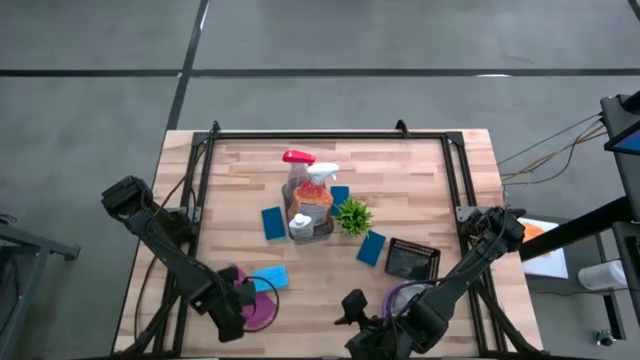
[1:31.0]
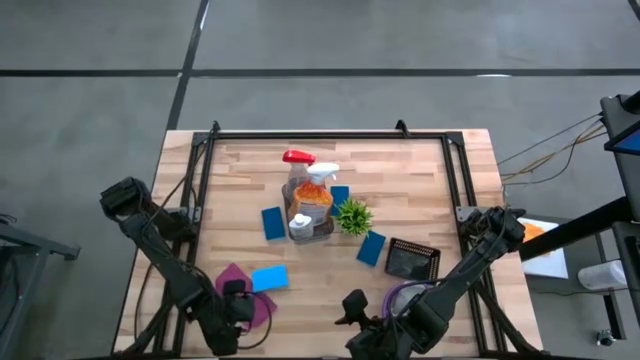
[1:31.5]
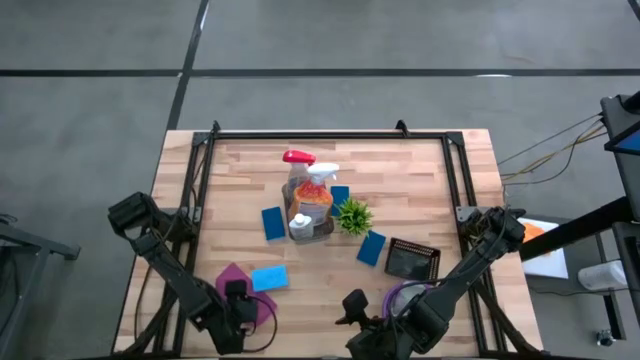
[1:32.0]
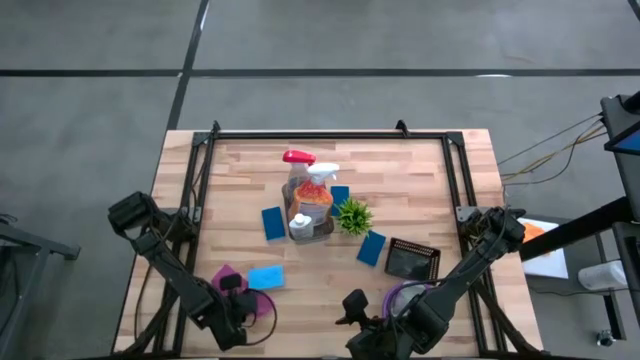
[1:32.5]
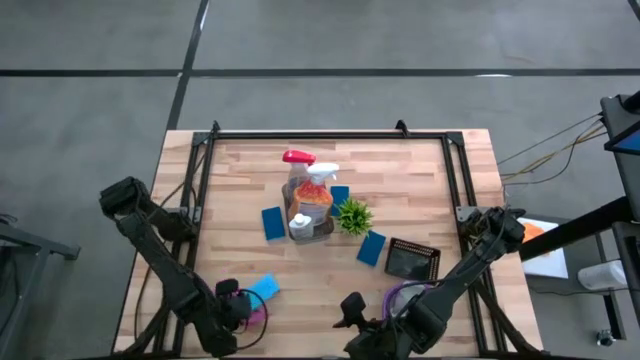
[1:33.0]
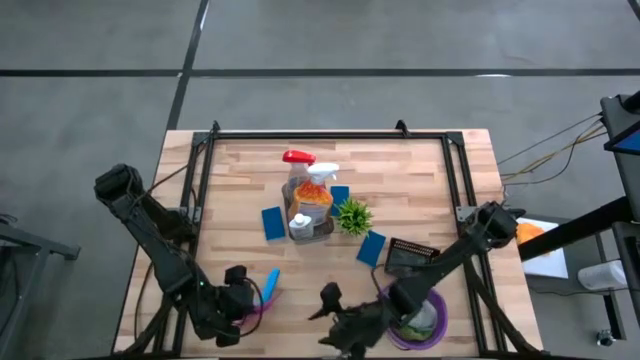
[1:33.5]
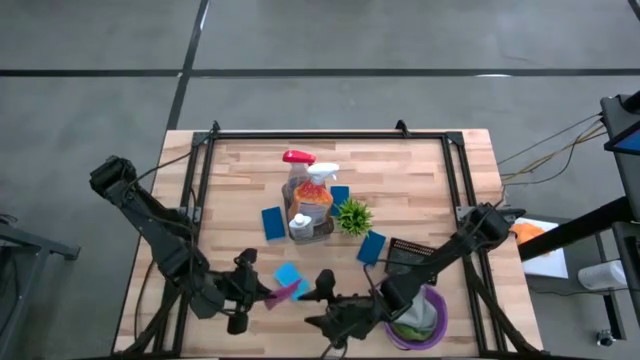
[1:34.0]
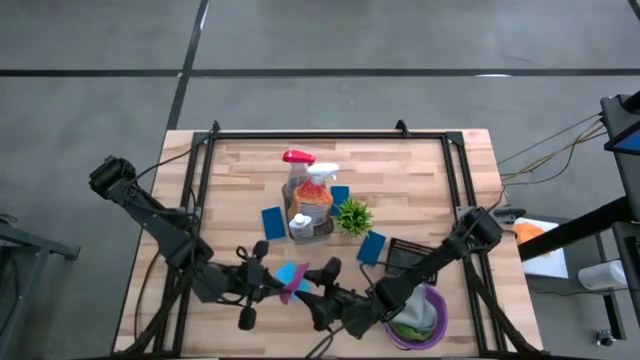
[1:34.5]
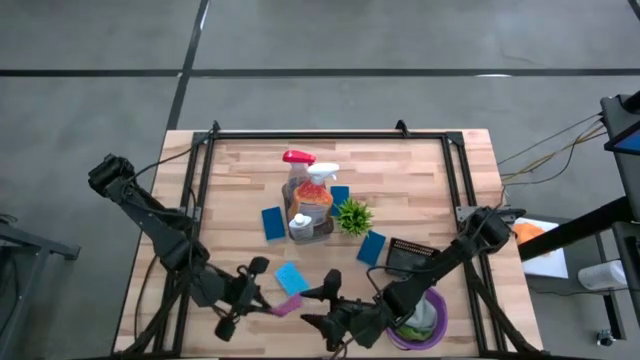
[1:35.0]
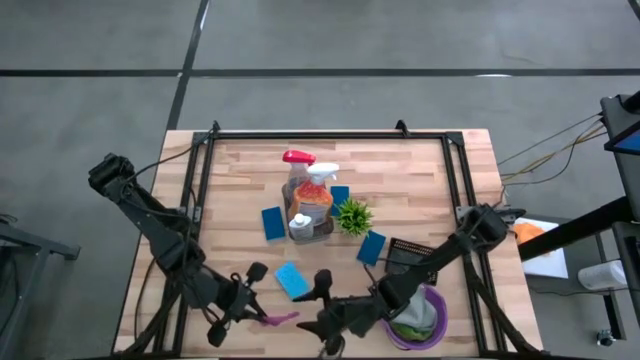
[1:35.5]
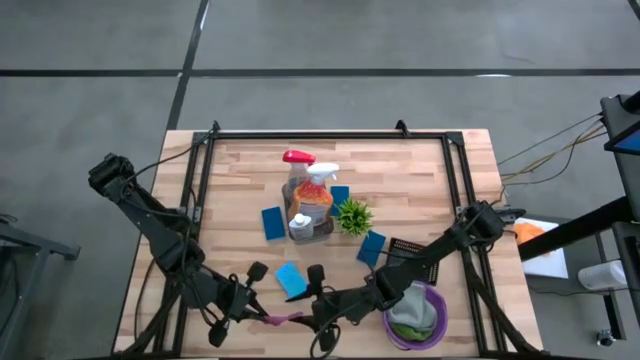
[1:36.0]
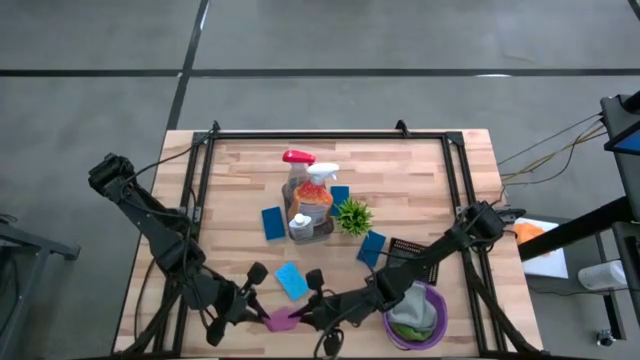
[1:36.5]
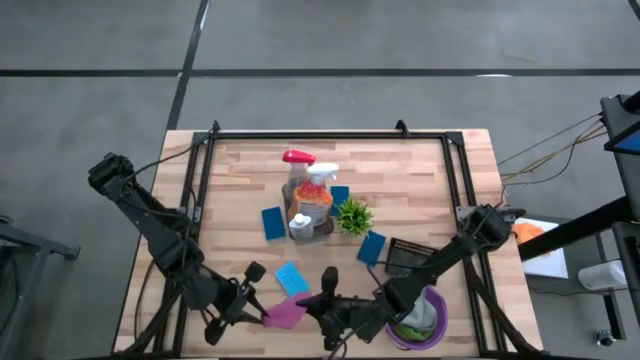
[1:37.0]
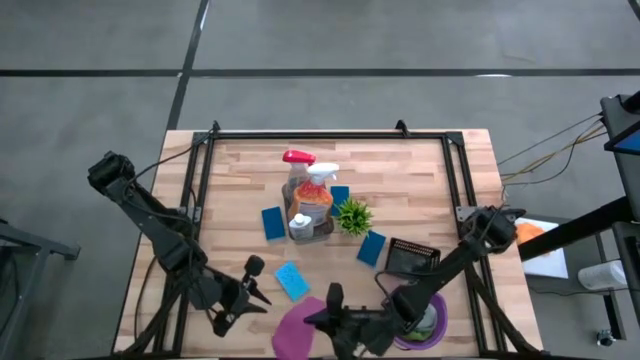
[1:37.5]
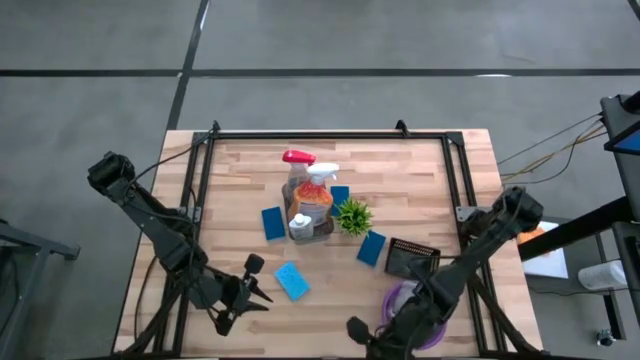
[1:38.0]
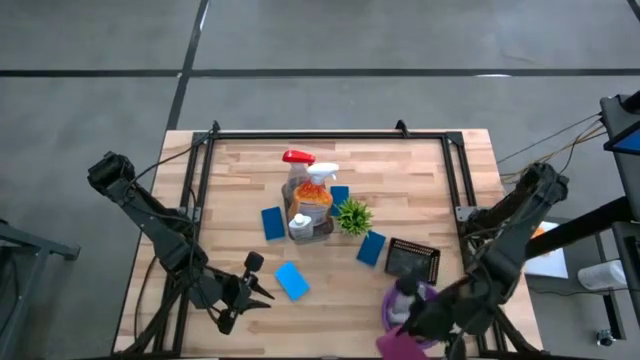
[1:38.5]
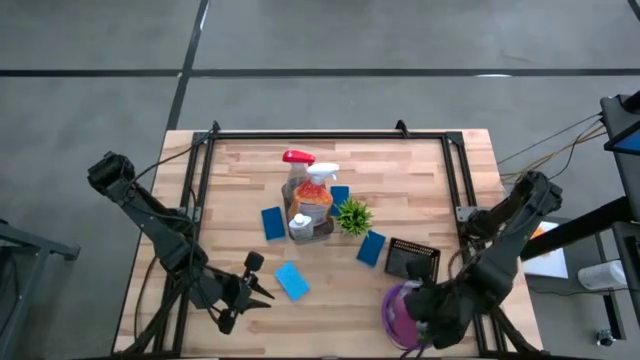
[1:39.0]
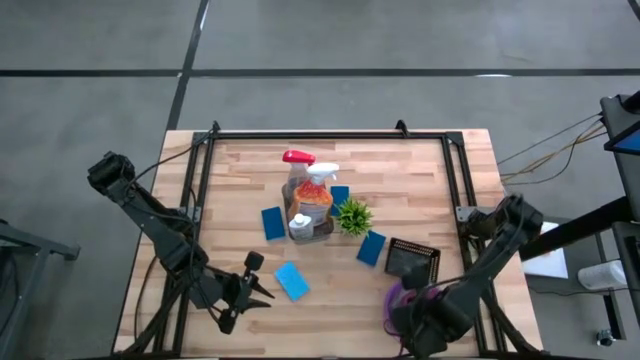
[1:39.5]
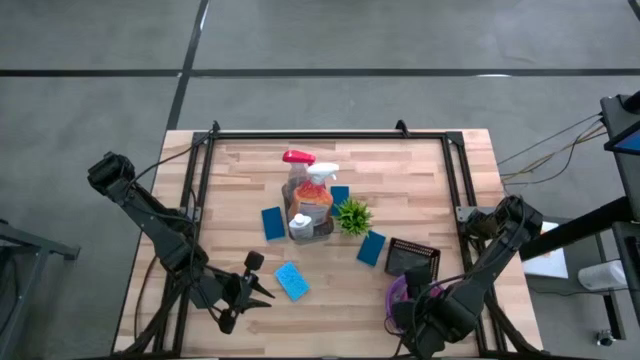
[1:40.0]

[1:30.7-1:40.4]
Task: Pick & Place Kitchen Items
Put the purple towel into the purple bucket

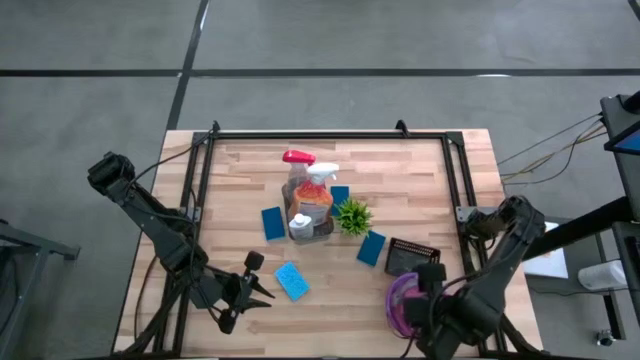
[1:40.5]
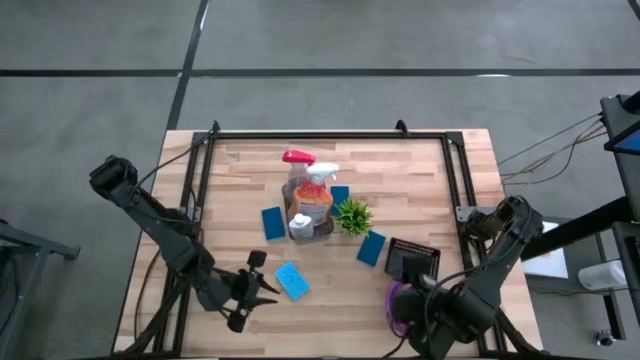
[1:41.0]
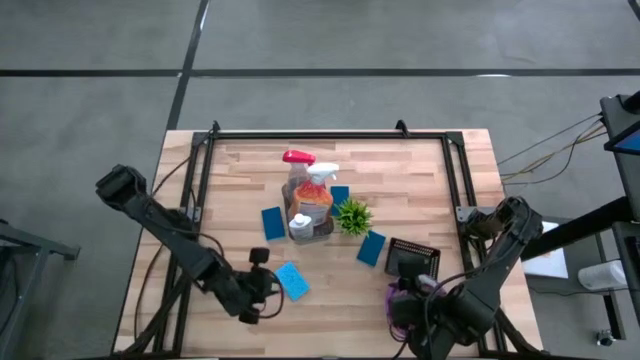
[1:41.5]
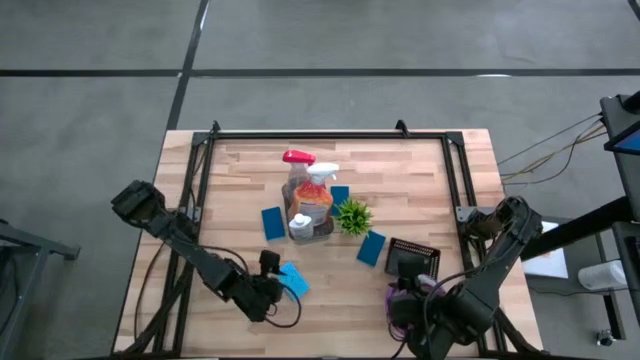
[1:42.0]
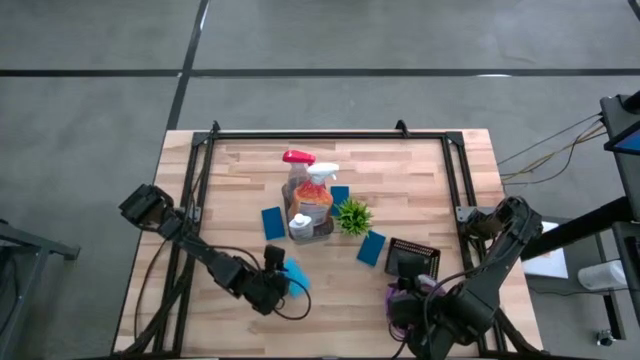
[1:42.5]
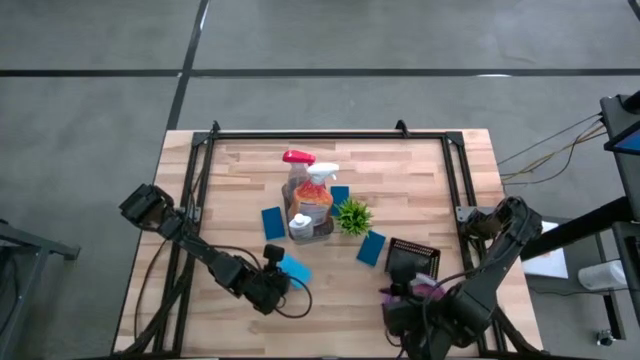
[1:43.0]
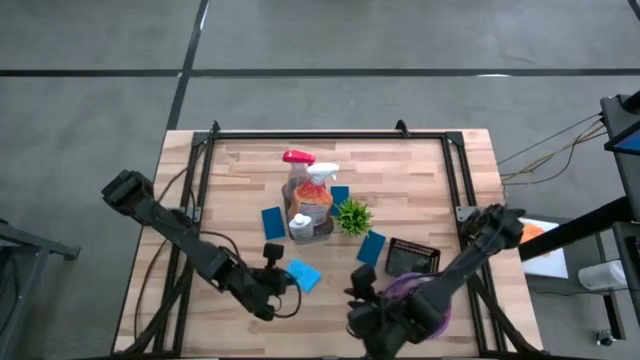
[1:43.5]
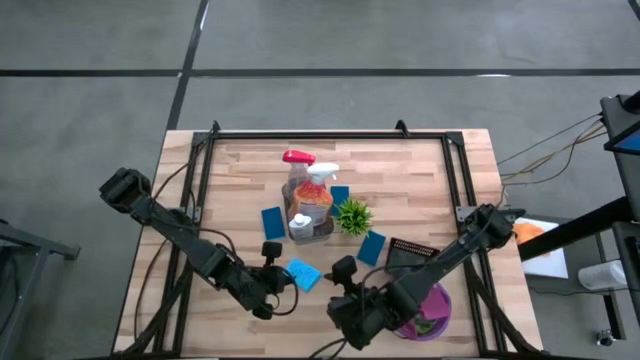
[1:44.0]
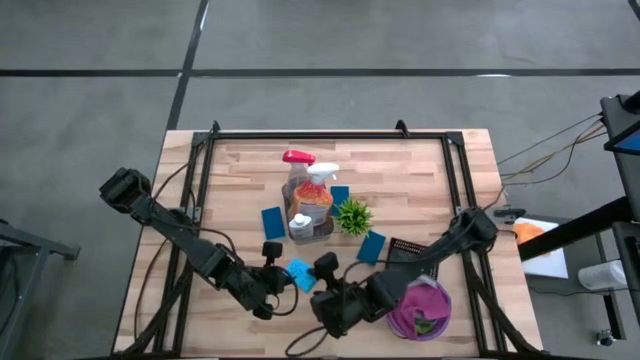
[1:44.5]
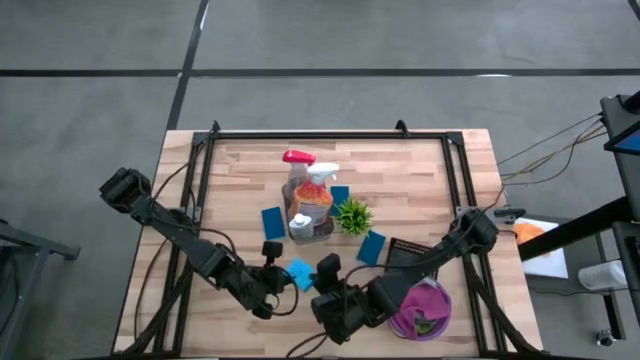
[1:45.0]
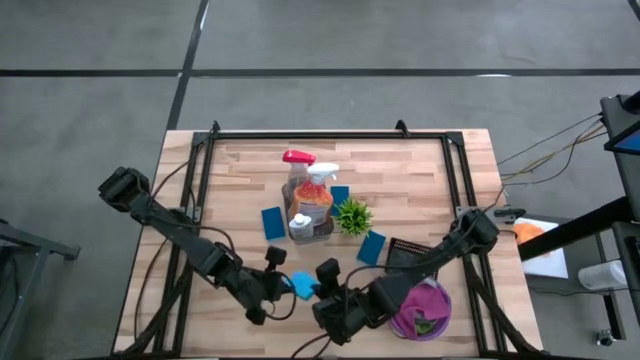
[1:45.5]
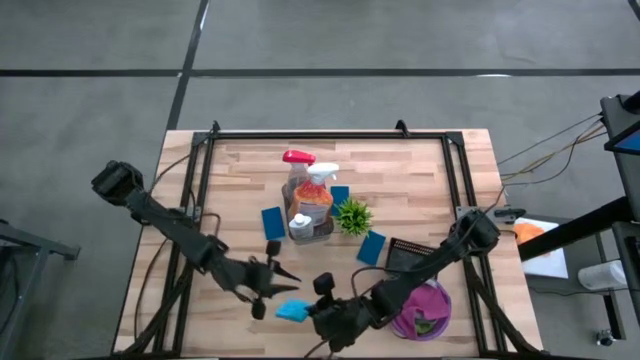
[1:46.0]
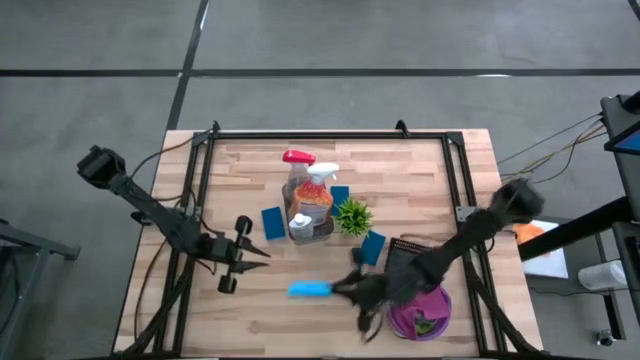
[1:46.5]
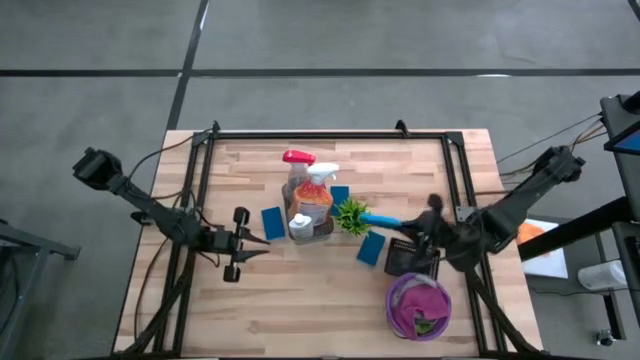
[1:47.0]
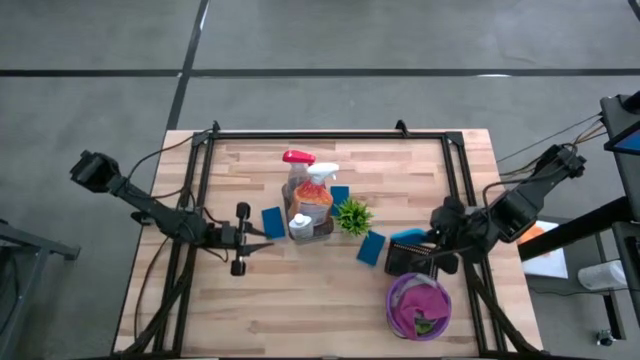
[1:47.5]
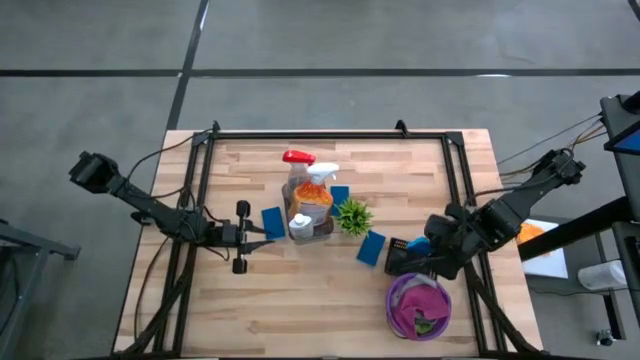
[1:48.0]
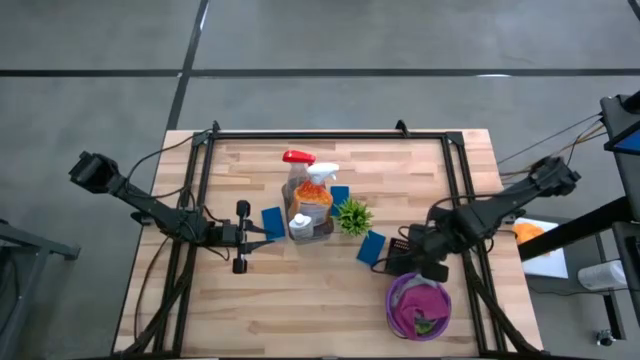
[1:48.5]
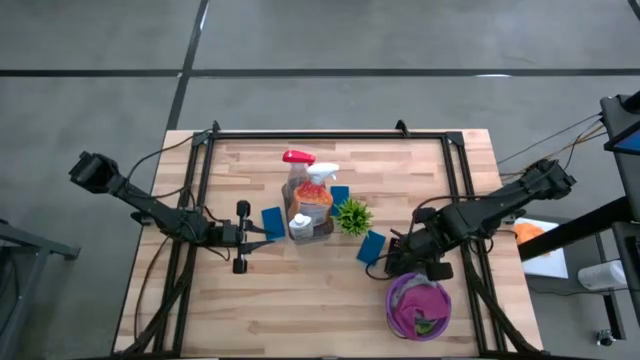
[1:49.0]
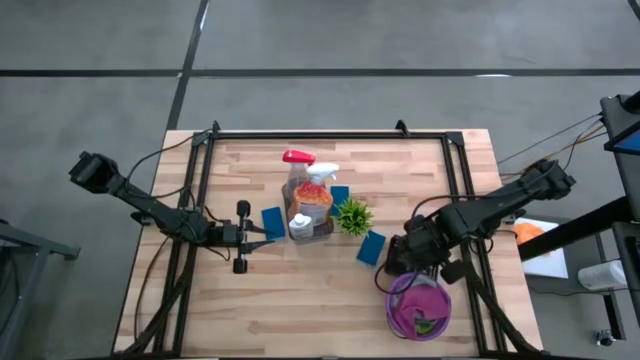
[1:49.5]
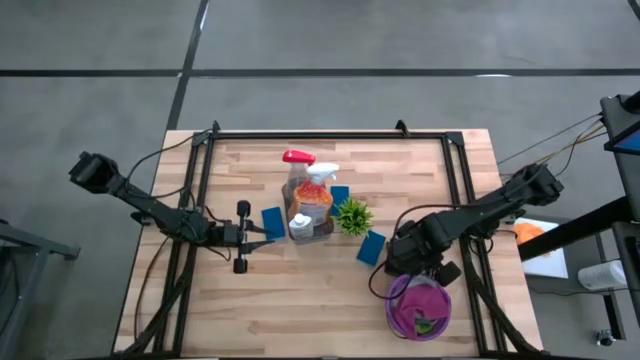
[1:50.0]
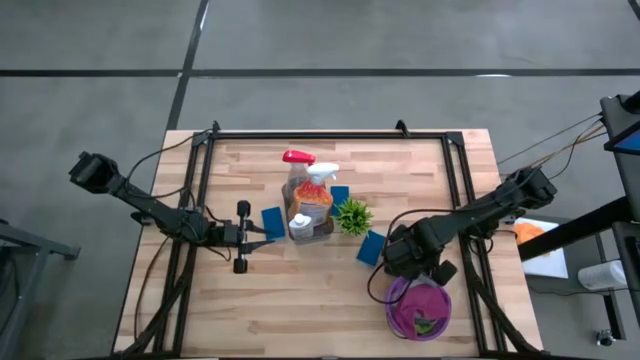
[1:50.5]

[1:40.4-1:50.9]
Put the blue sponge into the black bin

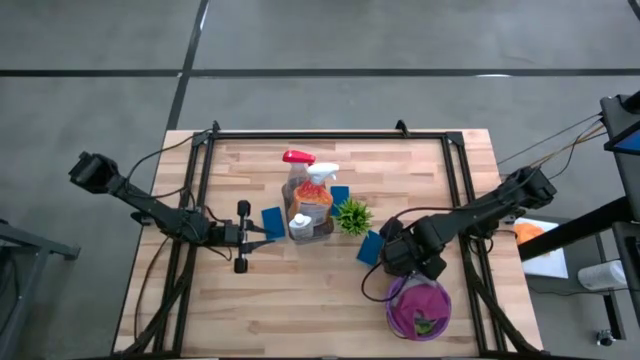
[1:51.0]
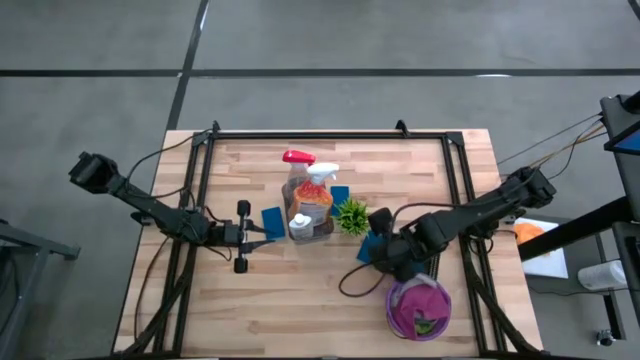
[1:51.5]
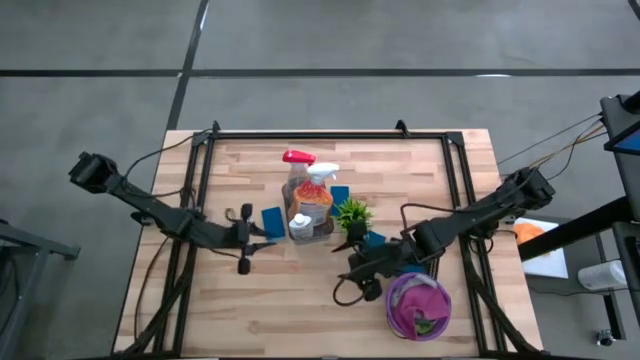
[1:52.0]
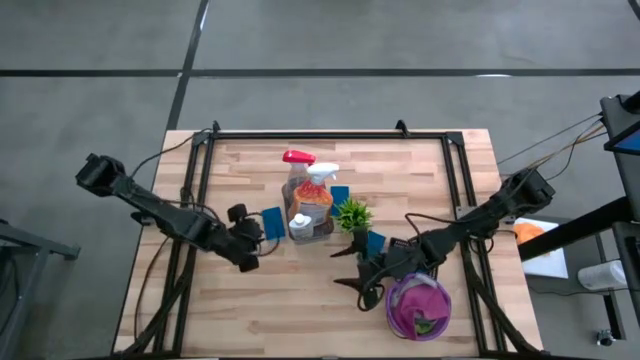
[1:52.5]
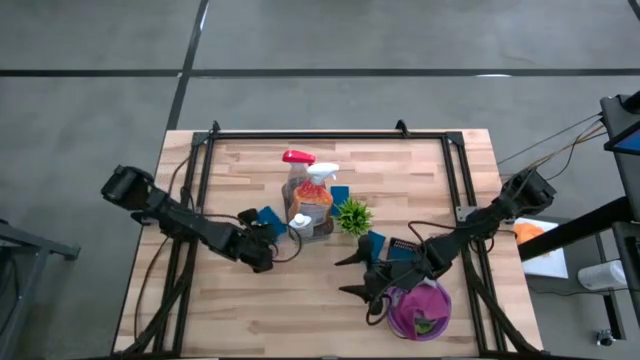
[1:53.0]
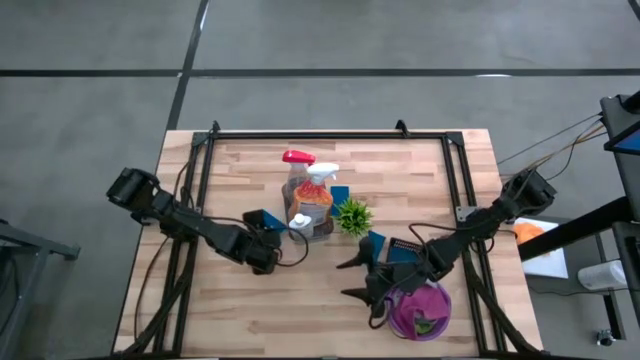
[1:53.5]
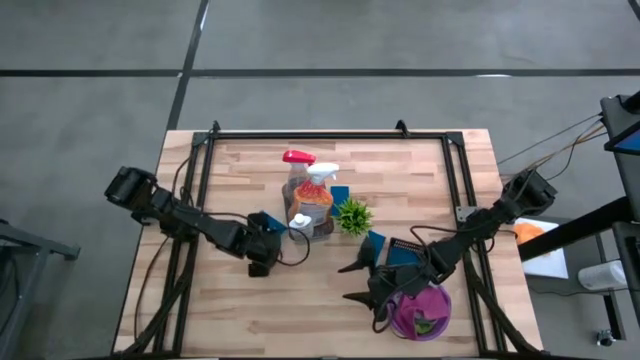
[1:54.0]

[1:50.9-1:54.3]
Put the blue sponge into the black bin
